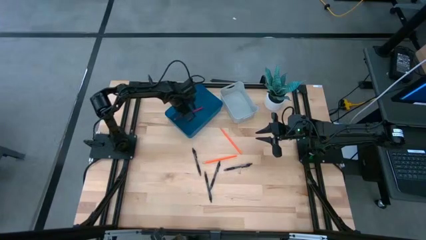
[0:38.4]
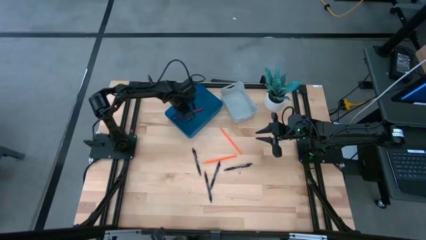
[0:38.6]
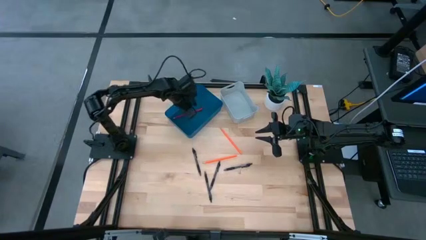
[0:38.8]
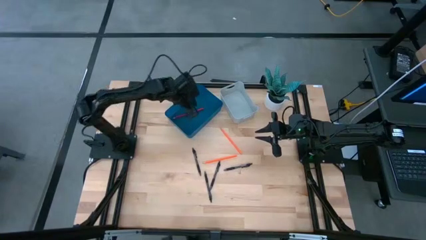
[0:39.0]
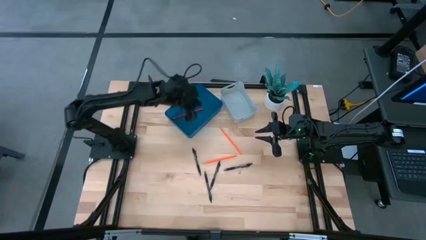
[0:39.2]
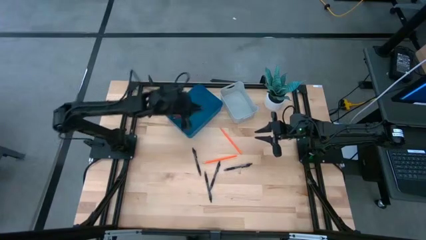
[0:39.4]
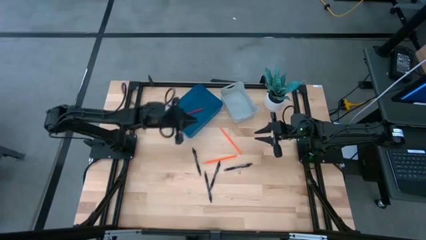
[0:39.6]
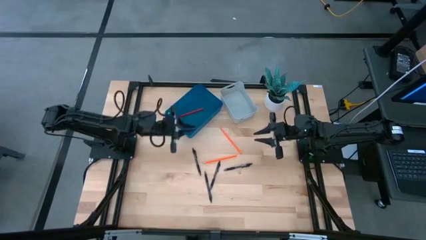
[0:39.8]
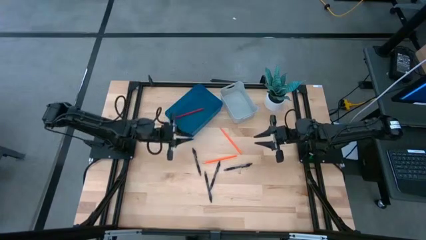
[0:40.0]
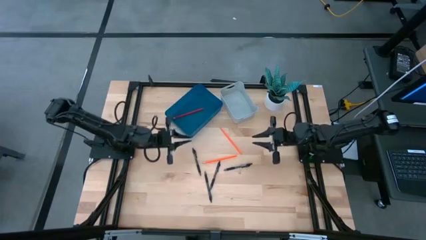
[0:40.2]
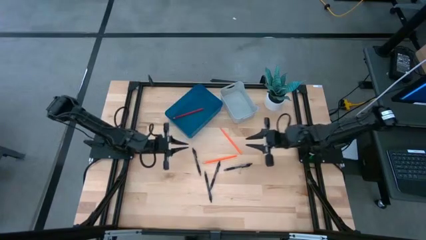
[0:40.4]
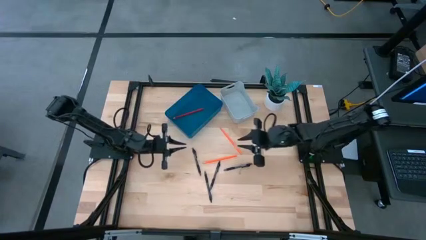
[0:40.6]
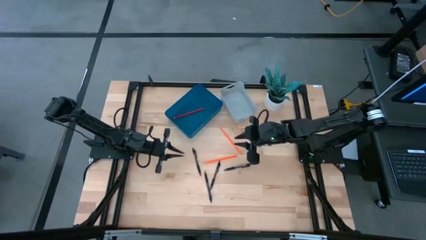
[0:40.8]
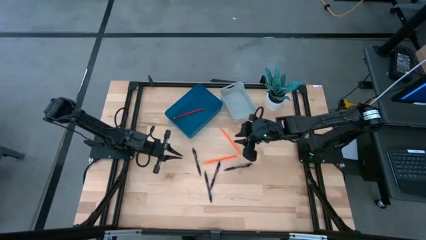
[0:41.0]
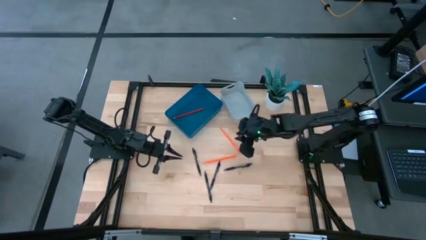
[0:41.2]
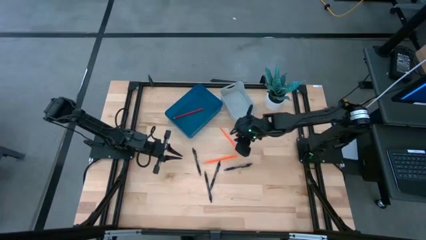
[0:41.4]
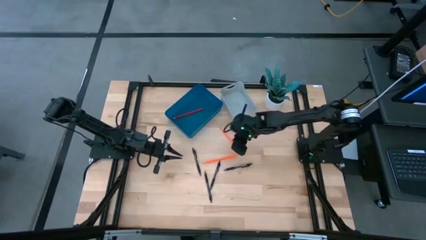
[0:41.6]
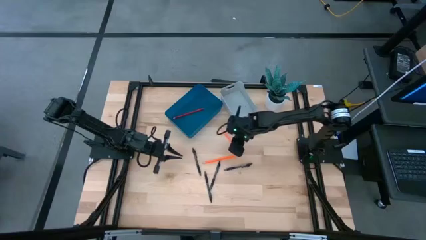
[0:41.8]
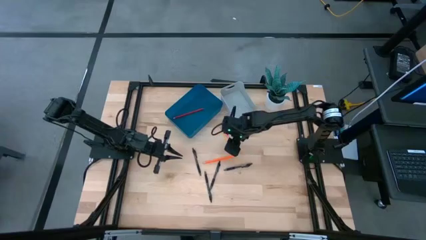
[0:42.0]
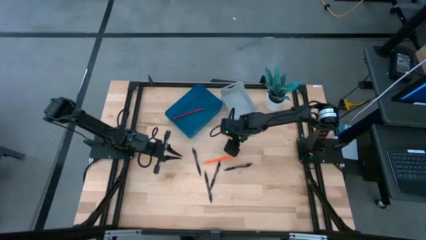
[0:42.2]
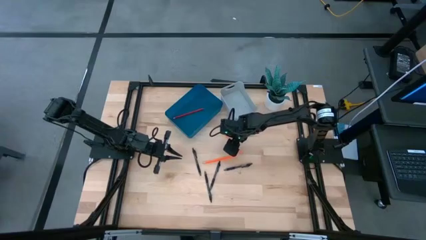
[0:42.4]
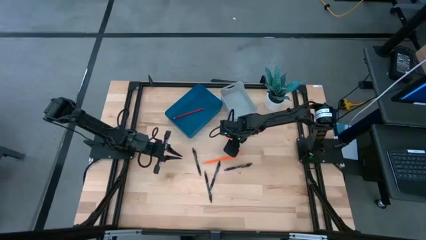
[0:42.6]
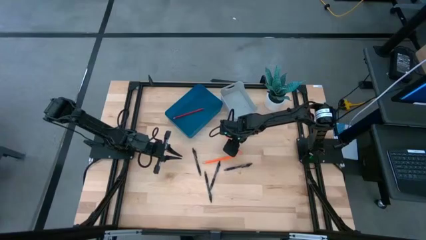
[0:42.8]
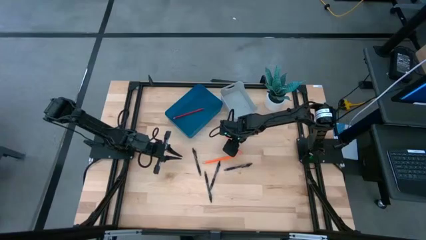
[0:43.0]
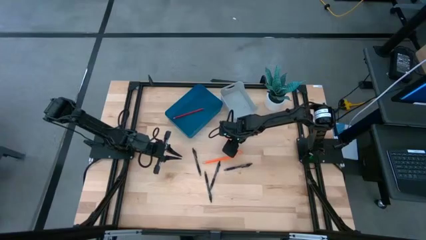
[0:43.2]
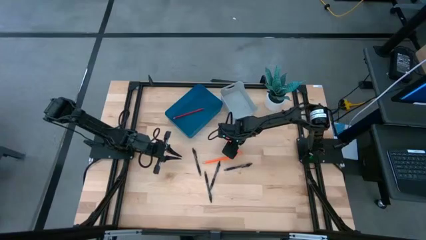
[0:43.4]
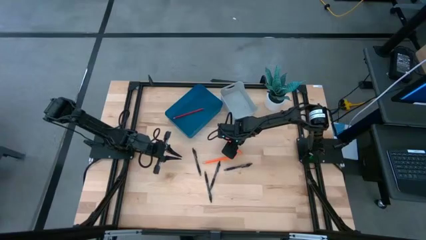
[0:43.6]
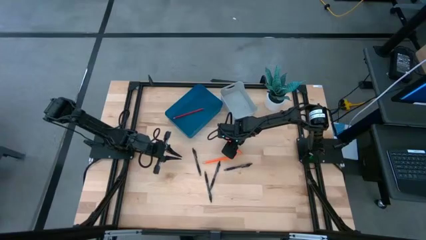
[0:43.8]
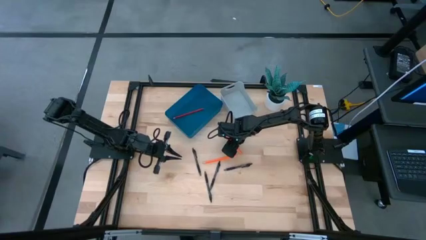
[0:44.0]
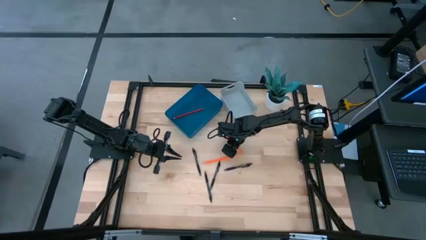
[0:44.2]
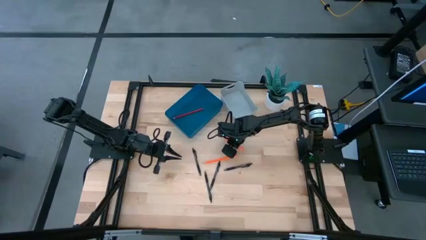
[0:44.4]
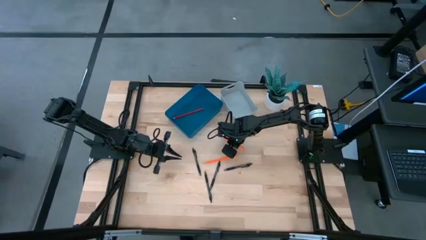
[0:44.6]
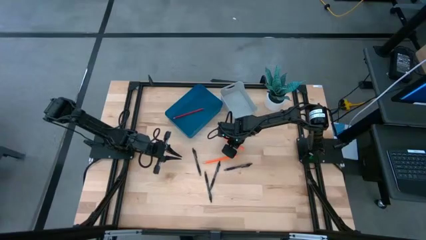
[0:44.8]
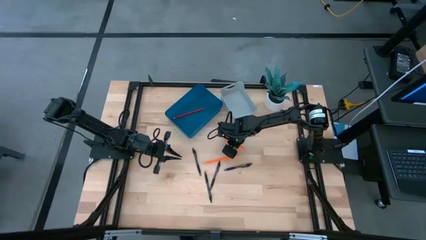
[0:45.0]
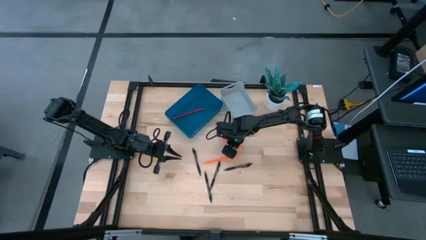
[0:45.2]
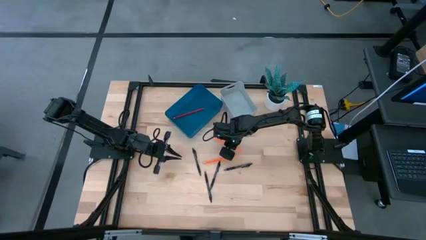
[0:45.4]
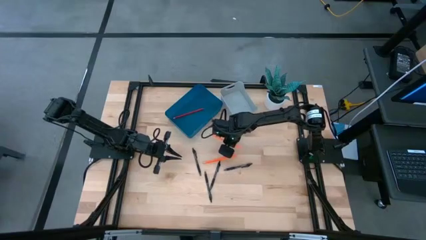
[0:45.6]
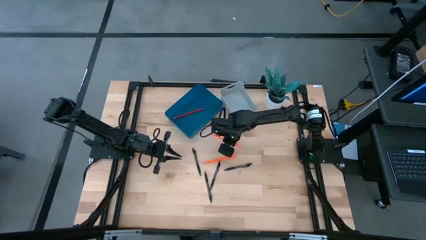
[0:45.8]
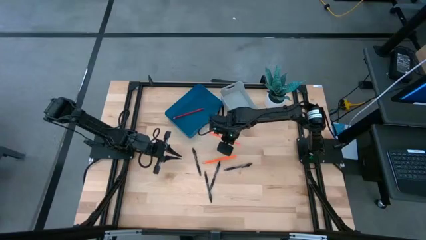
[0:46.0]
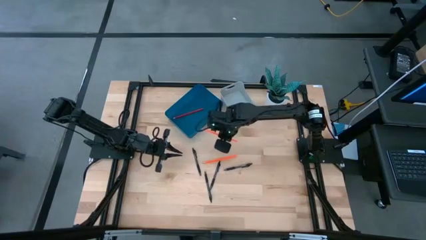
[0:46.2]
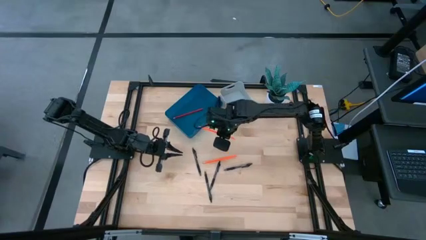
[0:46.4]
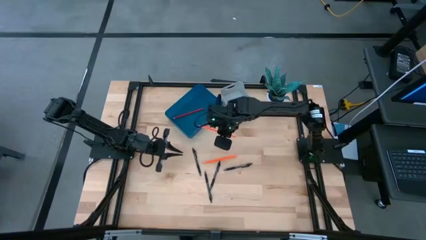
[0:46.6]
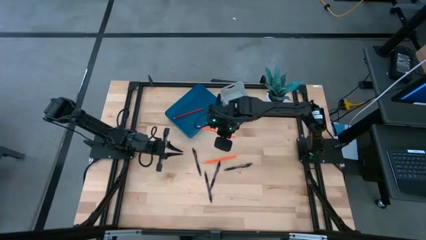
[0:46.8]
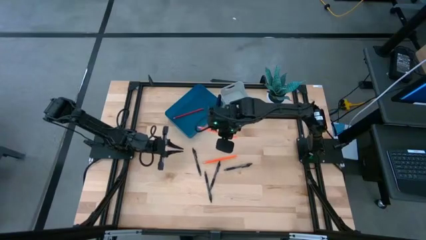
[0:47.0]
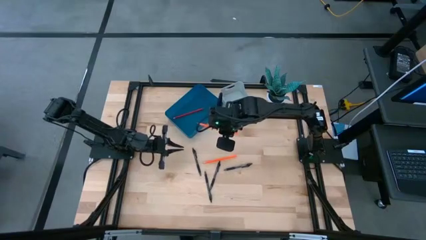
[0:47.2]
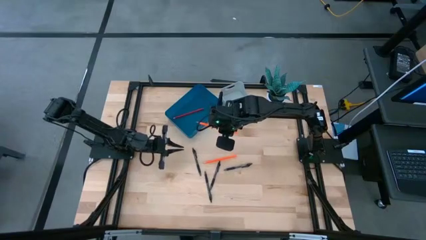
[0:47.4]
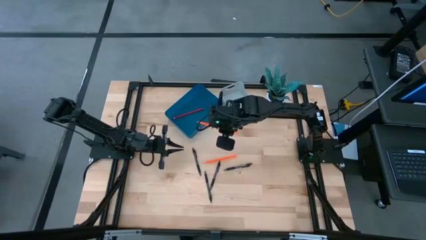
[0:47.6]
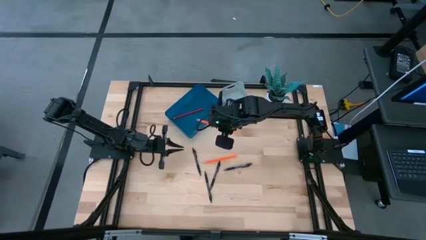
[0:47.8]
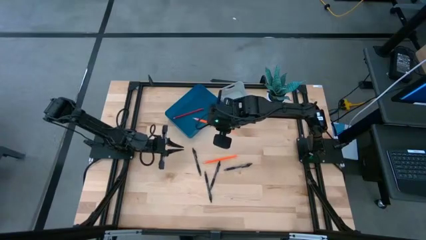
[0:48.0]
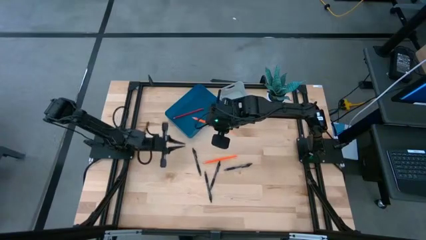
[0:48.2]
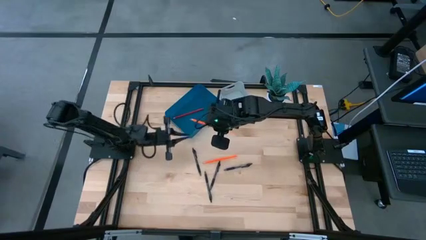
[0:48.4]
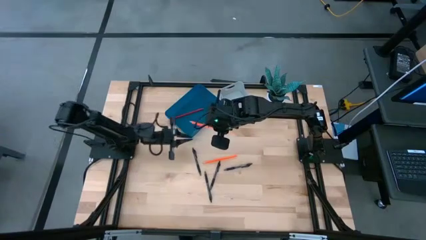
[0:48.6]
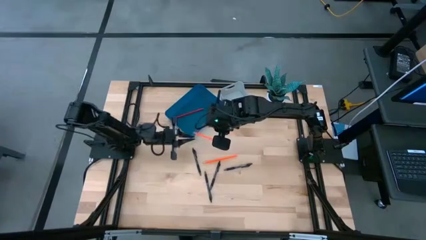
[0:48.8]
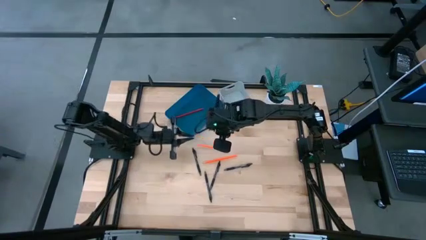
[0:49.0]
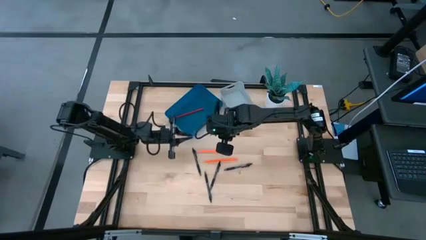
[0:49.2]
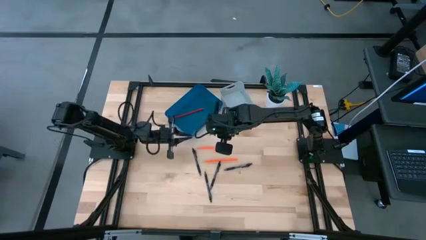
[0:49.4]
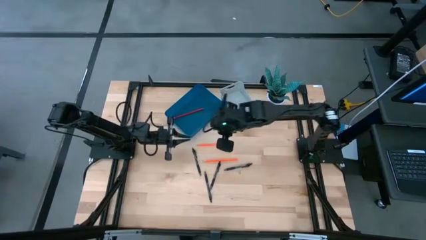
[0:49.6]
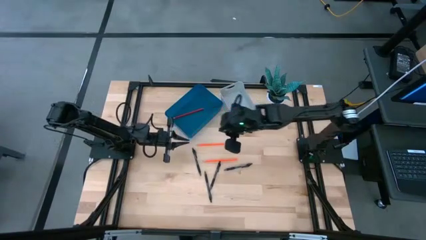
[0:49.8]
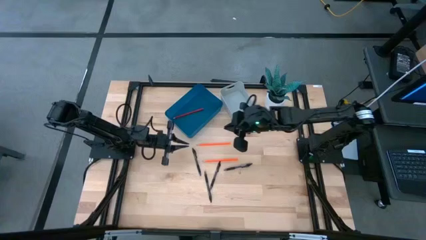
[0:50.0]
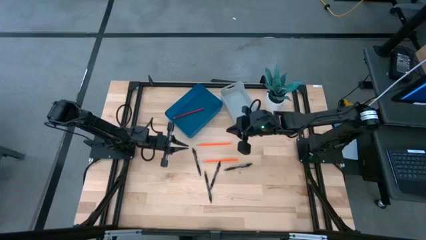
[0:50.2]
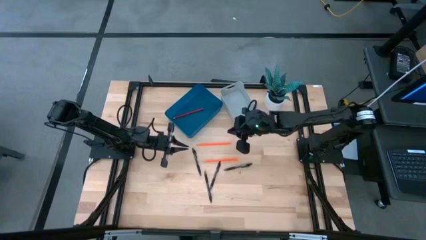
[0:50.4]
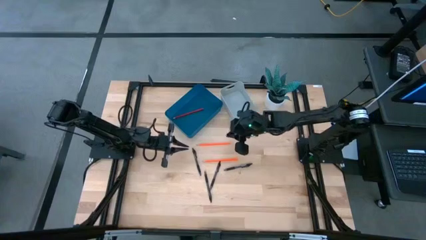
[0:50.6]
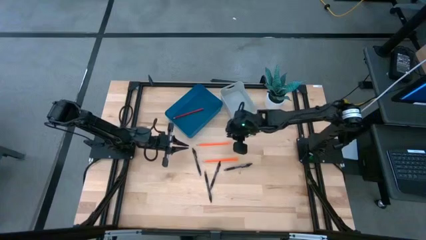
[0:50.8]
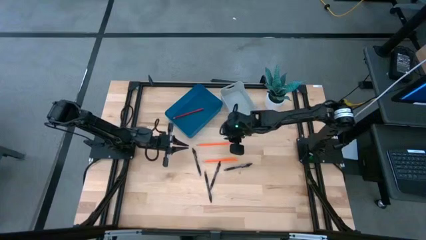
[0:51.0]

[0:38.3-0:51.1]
Task: Sort pens & pencils
Put the orange pencil into the blue bin

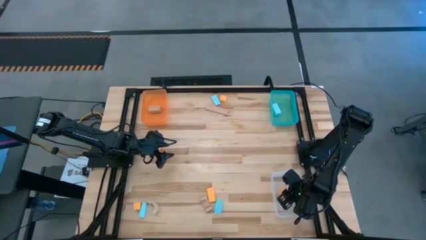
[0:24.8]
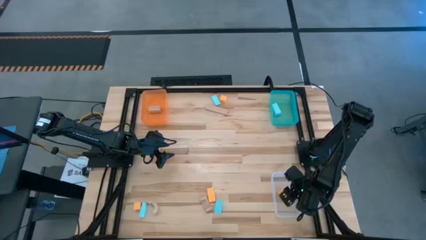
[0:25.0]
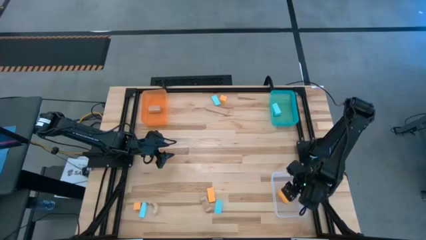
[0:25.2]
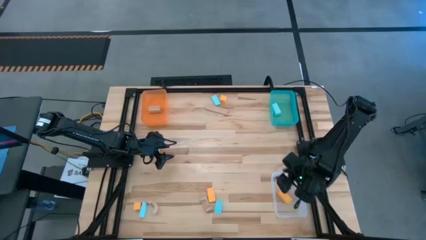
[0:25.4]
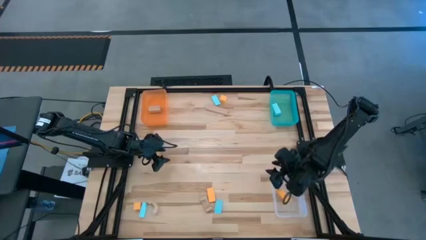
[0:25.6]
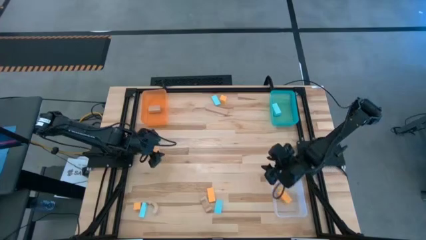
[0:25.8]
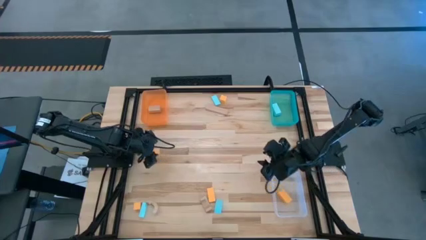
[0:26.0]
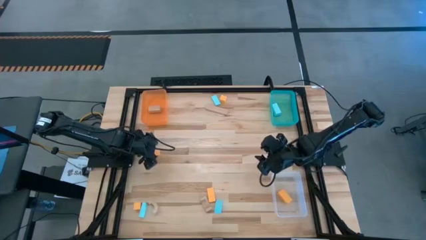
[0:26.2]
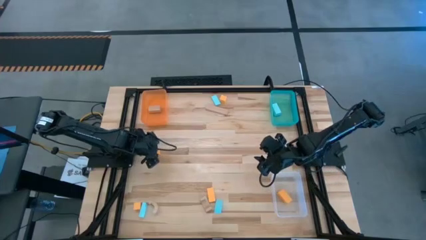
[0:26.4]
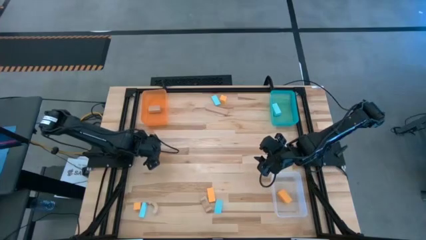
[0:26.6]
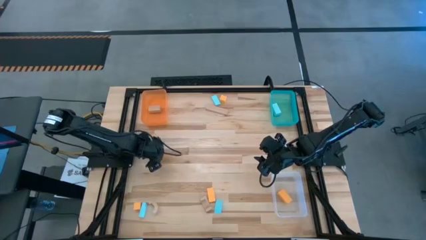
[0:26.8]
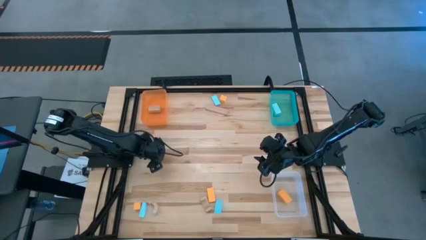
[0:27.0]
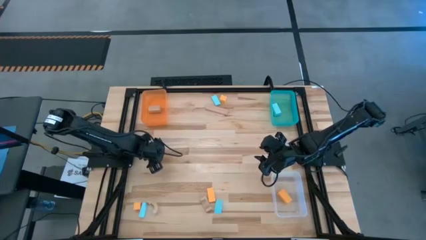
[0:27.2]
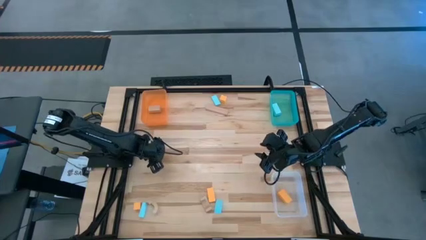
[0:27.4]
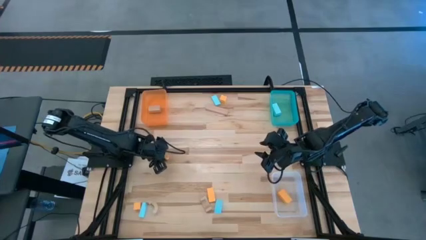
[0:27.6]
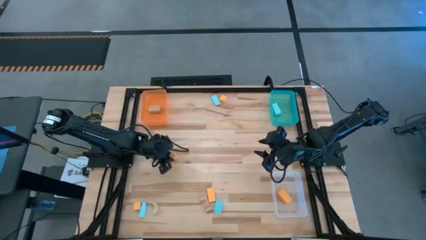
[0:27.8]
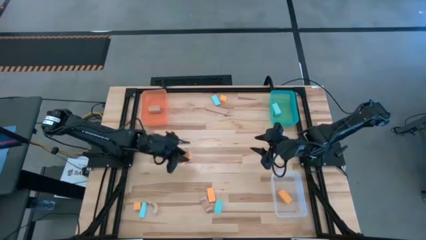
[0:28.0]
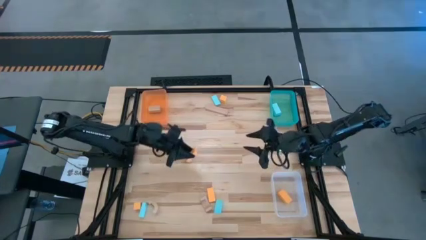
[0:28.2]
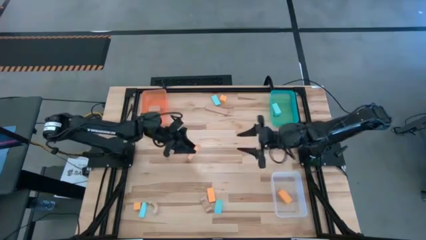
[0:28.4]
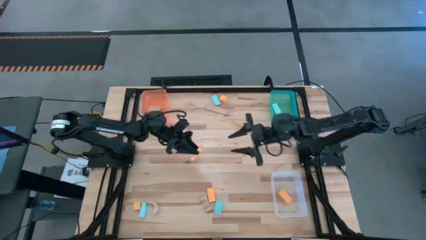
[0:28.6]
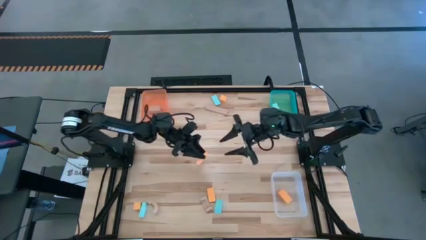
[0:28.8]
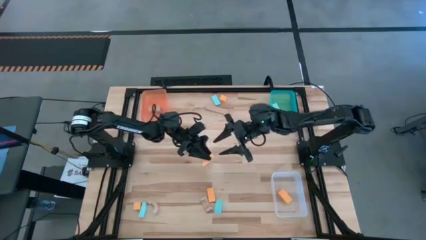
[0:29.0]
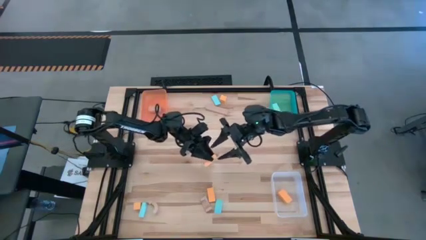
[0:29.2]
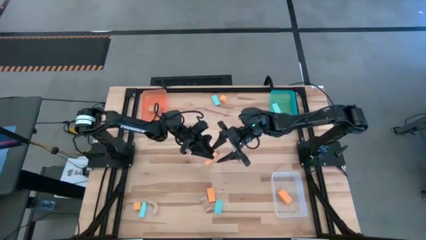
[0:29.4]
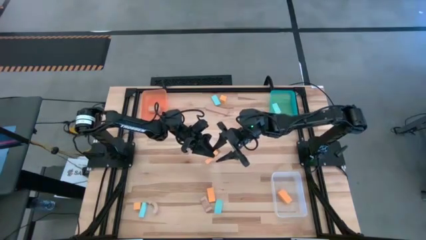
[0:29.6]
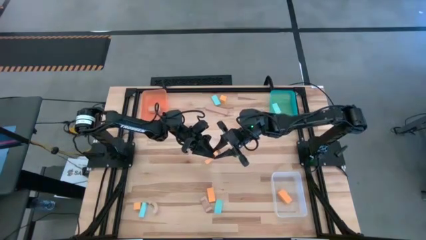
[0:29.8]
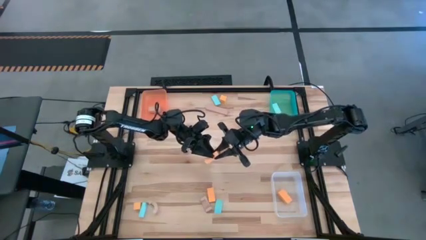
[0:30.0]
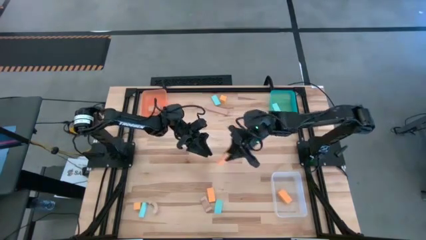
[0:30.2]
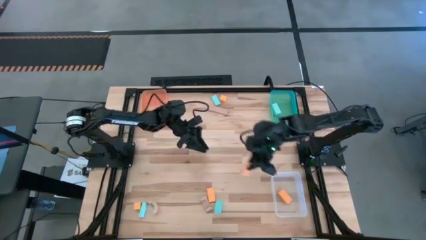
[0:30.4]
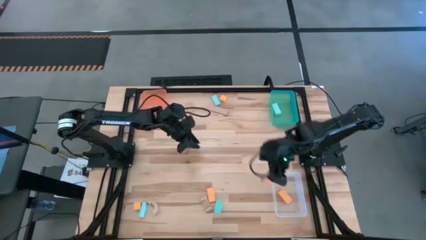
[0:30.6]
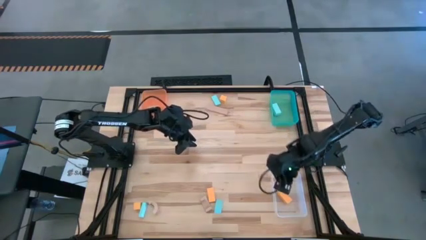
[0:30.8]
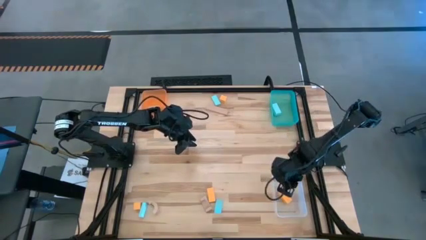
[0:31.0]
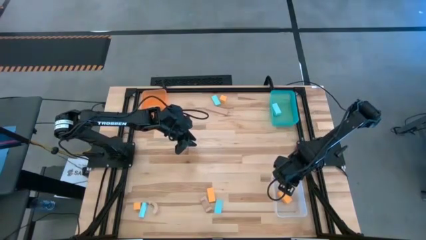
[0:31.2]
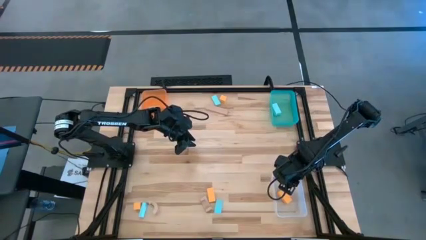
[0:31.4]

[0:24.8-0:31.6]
Task: Sort & place blocks by color
Put the orange bin into the white bin
